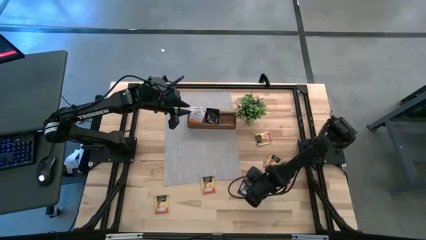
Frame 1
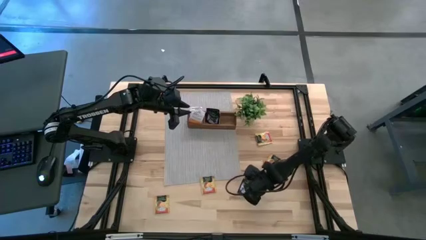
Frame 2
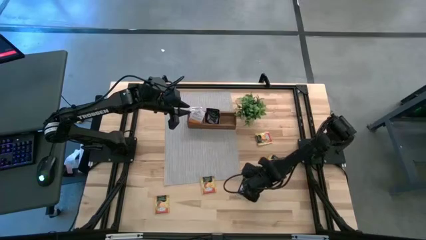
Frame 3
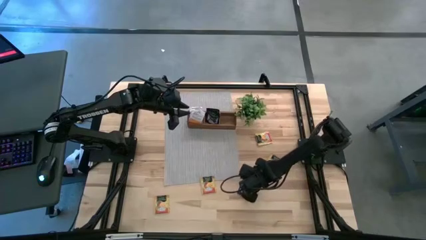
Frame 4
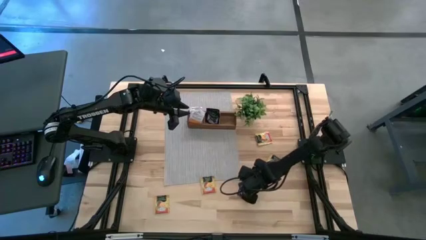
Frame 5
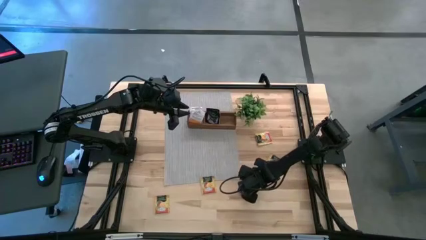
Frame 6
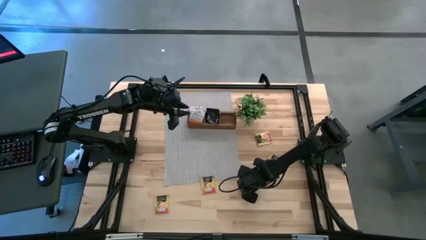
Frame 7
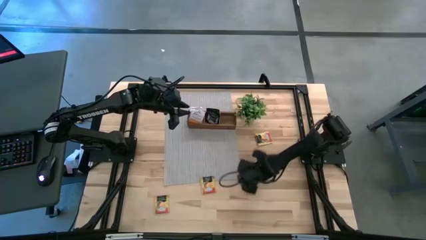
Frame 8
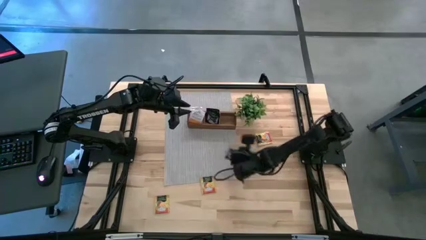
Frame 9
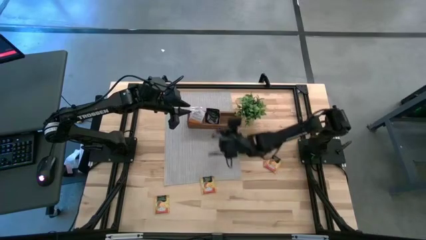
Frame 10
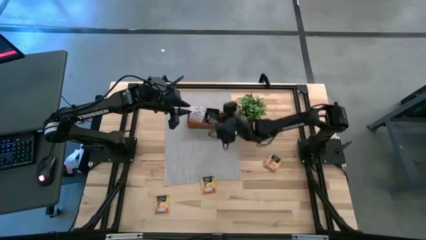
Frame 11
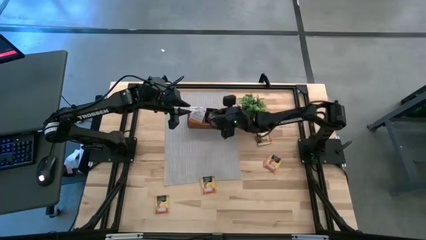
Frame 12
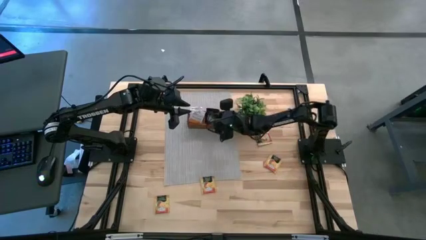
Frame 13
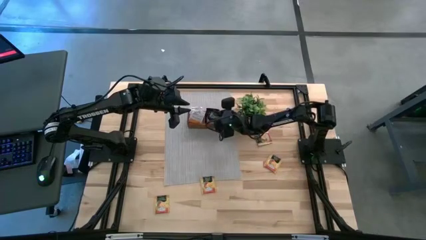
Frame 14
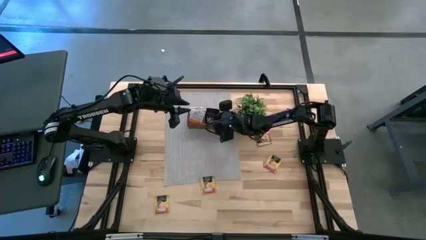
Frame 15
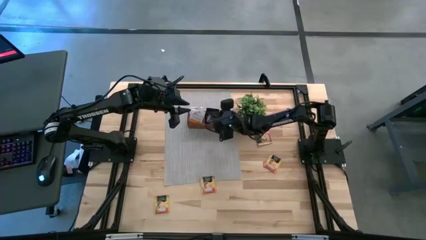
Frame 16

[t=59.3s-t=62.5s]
Task: Pick & Place Tea
Put the black tea bag in the middle section of the brown wooden organizer

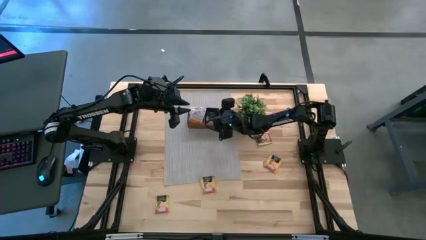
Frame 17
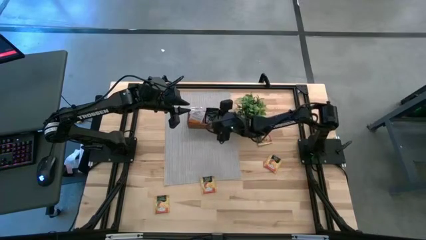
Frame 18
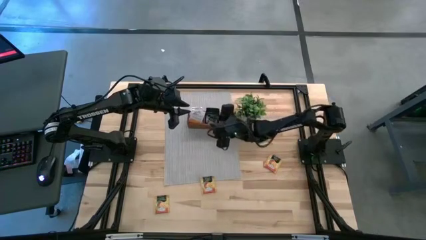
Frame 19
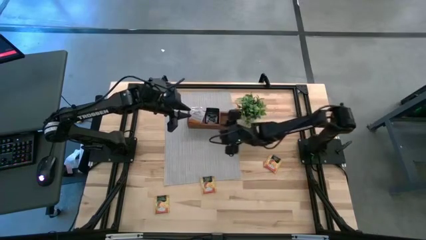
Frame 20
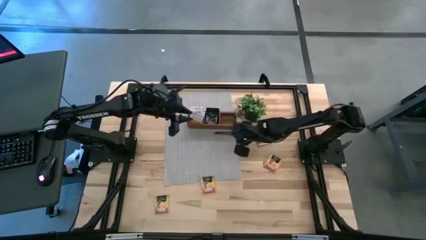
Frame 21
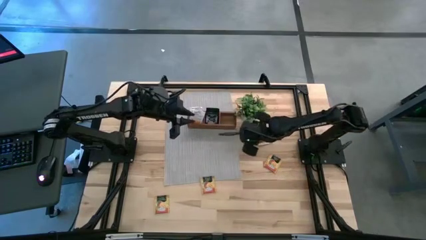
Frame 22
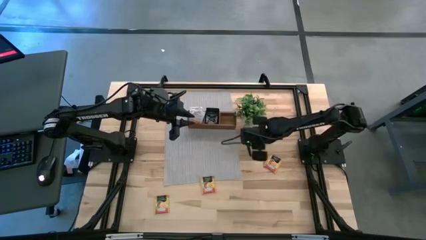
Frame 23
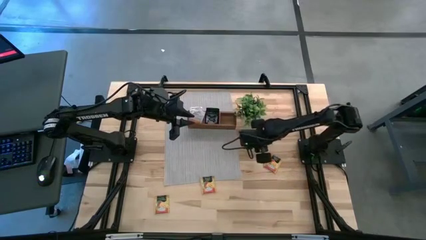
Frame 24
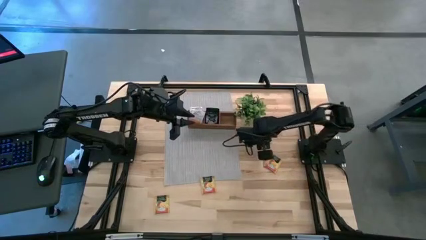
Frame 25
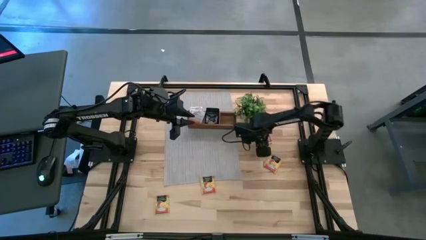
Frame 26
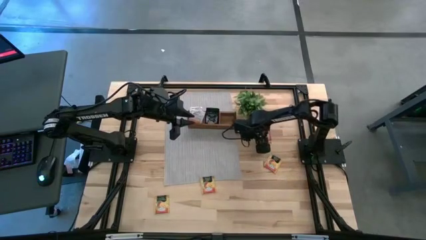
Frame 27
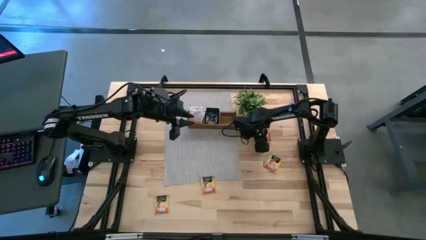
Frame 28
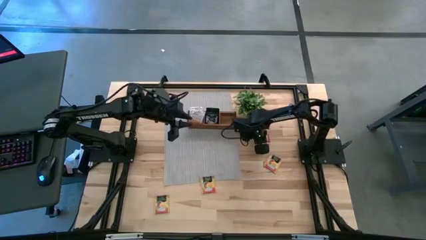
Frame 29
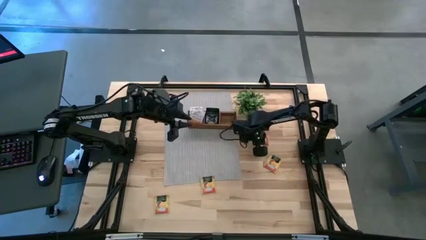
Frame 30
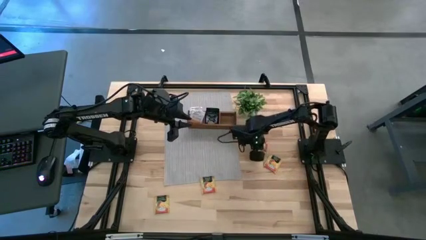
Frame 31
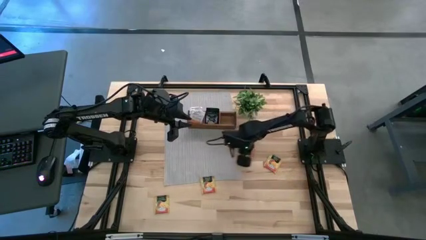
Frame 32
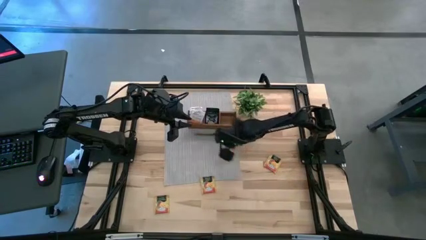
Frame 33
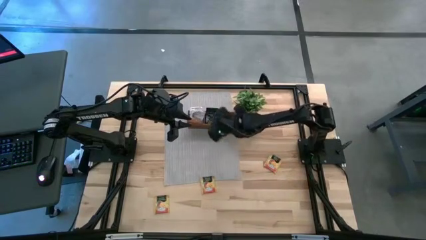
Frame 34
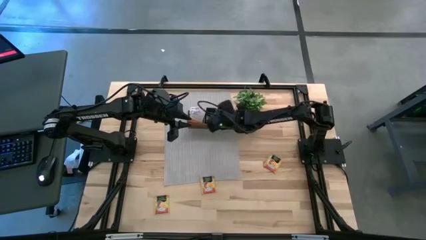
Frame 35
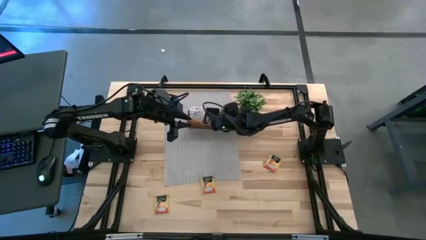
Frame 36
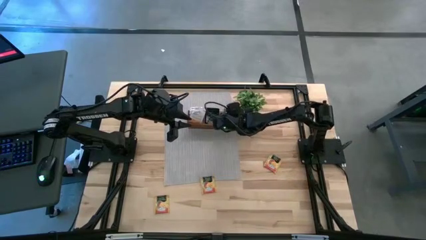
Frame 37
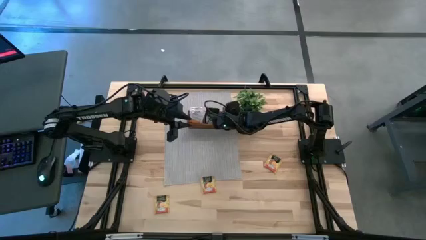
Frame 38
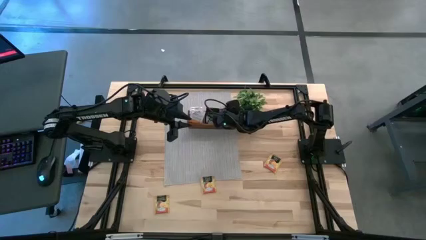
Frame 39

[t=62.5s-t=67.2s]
Put the orange tea bag in the right section of the brown wooden organizer

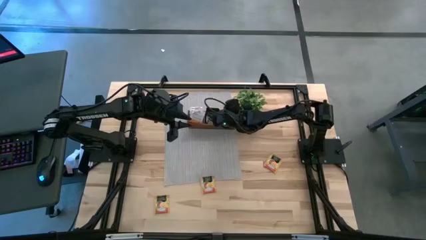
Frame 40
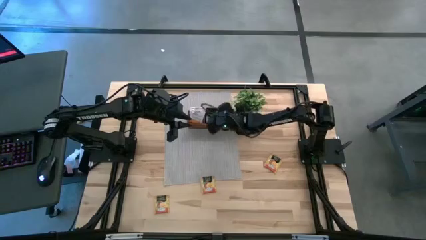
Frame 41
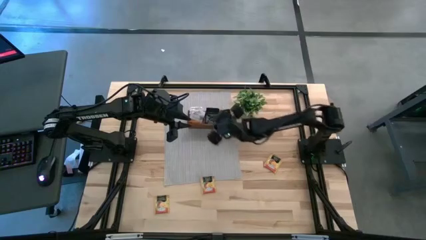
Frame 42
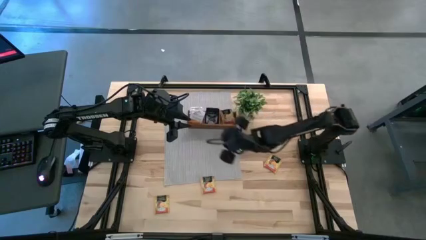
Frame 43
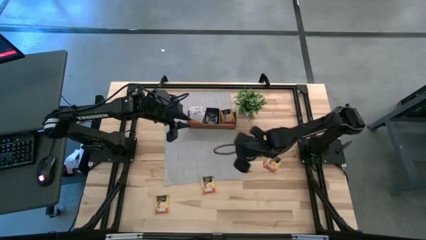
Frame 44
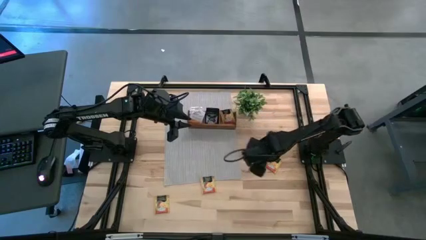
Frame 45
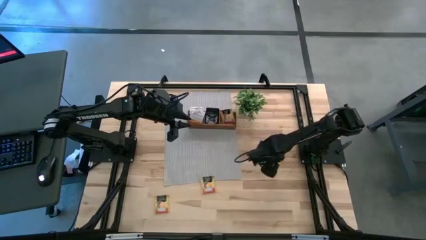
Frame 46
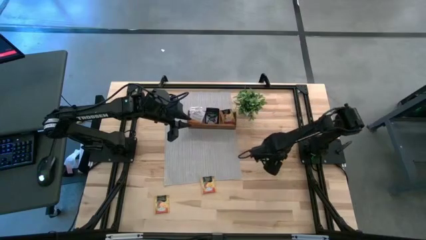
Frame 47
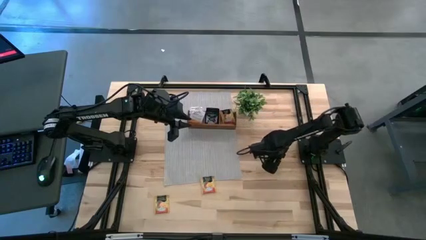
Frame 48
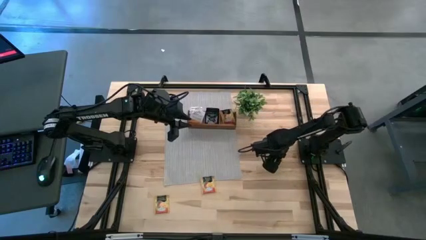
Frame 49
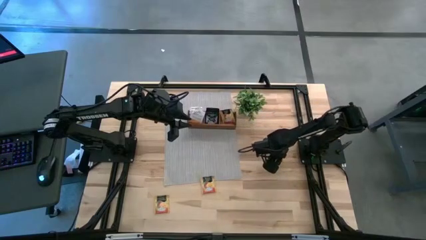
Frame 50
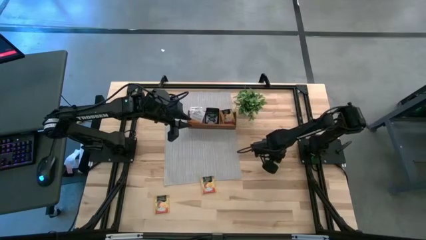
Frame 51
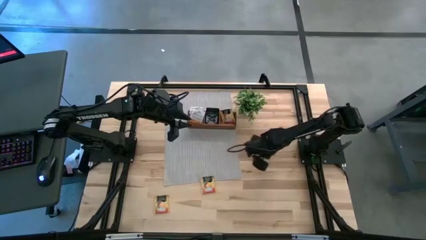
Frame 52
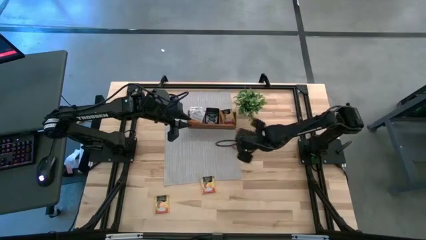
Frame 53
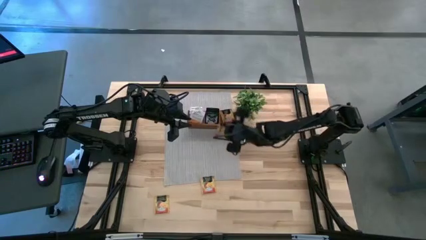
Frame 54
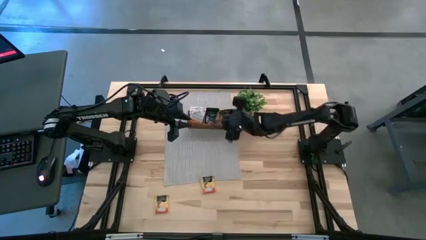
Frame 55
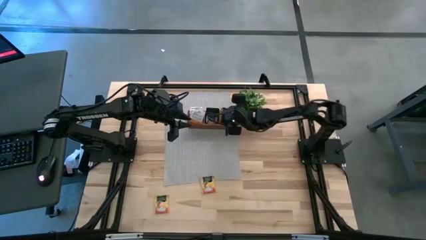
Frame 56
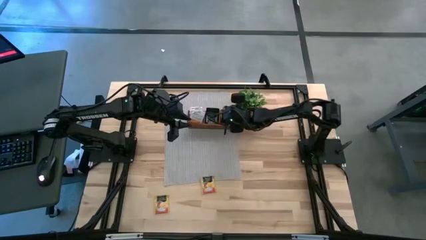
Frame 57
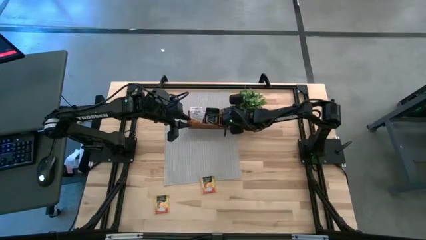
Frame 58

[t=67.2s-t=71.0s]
Put the orange tea bag in the right section of the brown wooden organizer

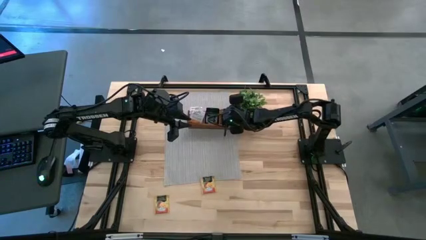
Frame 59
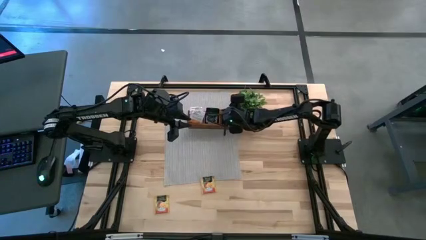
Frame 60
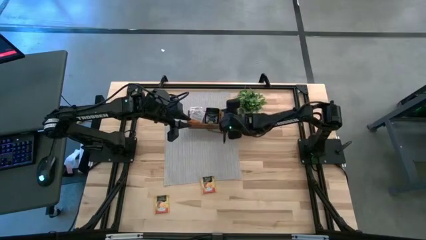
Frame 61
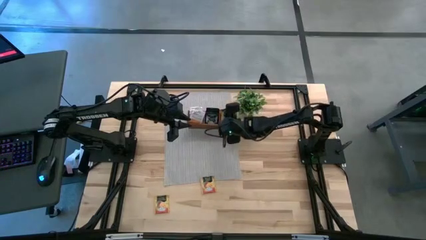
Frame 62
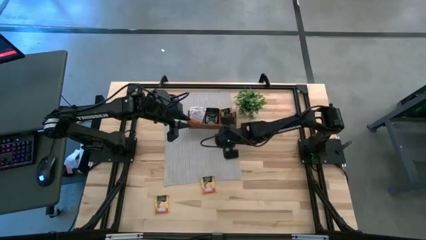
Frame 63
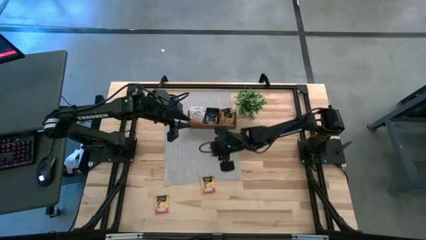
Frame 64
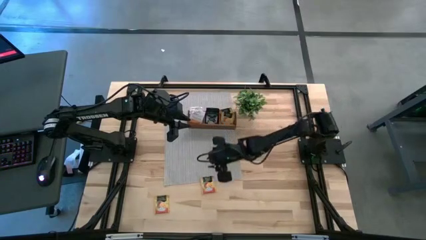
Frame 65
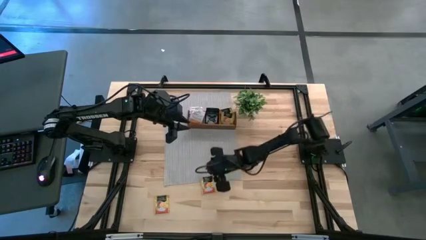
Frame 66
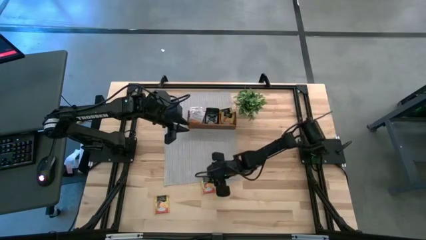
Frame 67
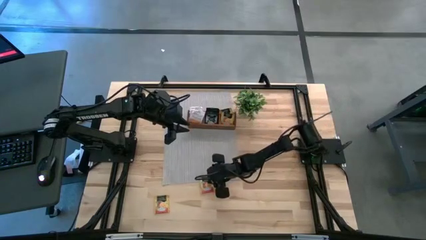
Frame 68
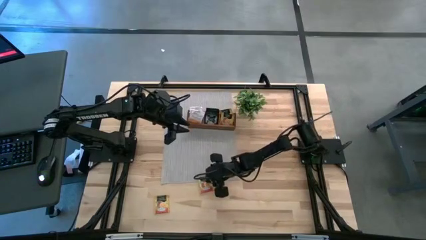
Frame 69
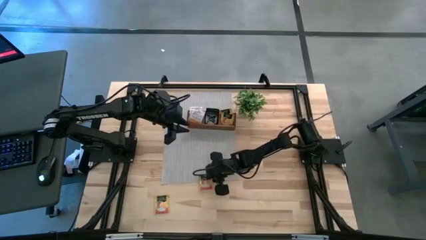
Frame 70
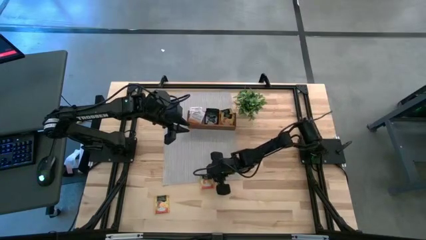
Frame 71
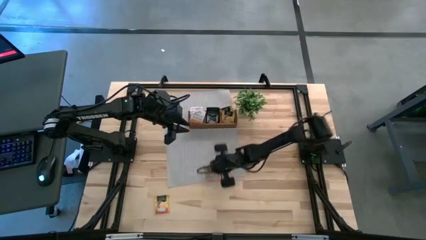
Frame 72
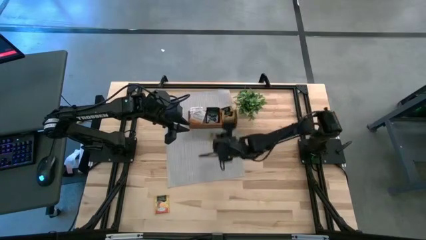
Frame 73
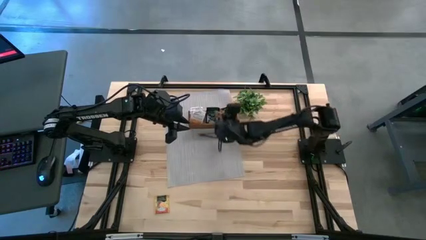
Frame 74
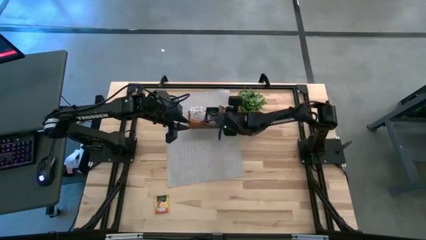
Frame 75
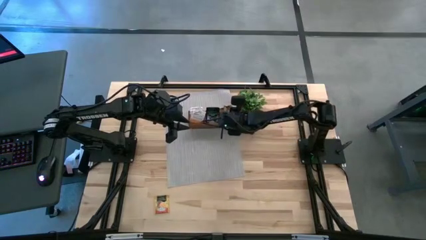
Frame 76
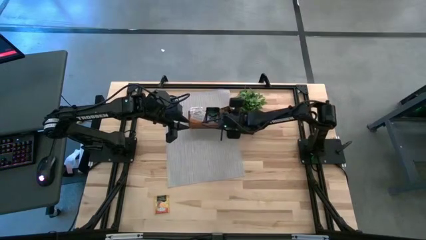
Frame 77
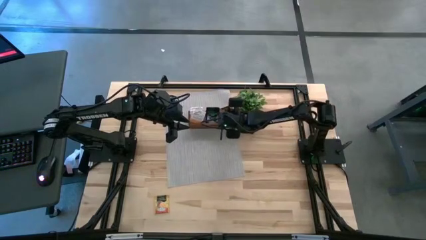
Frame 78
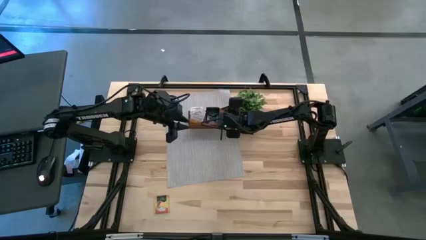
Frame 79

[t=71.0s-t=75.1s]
Put the orange tea bag in the right section of the brown wooden organizer

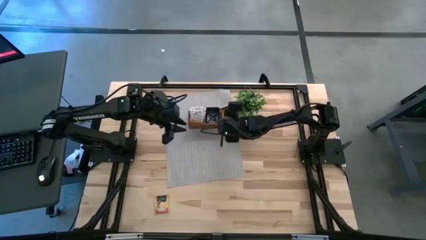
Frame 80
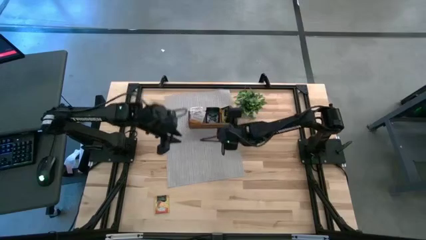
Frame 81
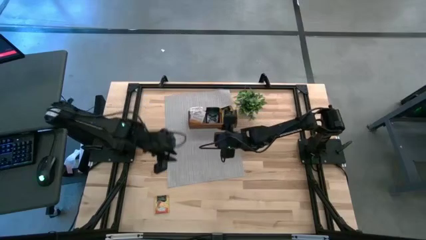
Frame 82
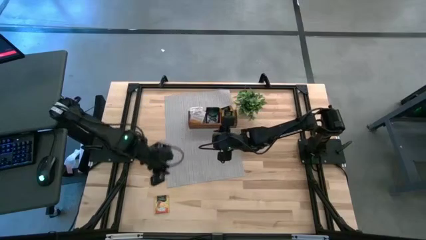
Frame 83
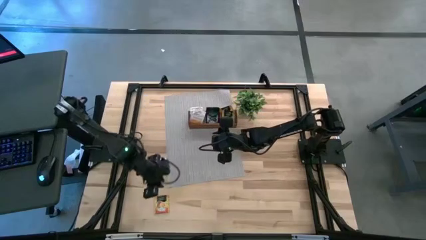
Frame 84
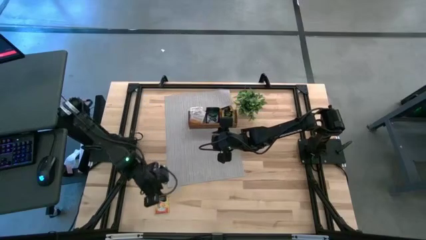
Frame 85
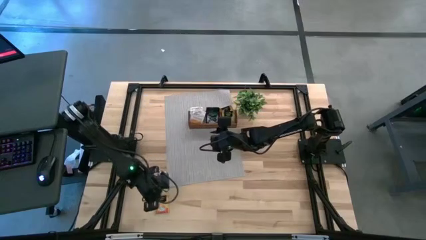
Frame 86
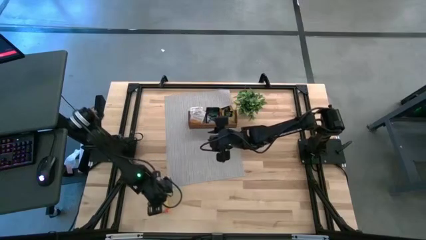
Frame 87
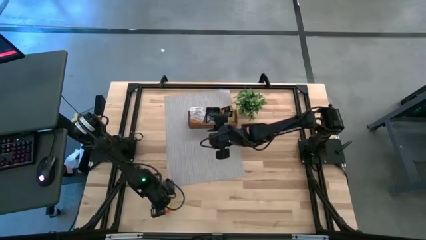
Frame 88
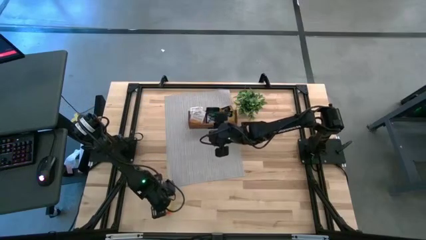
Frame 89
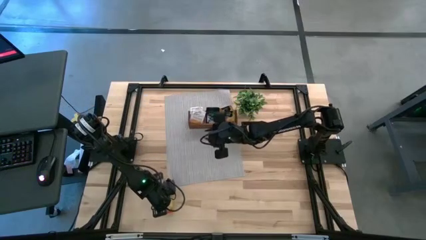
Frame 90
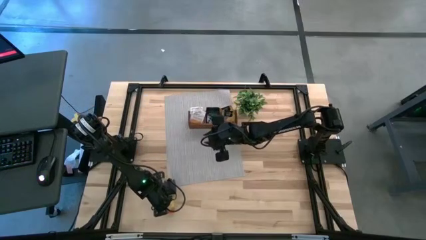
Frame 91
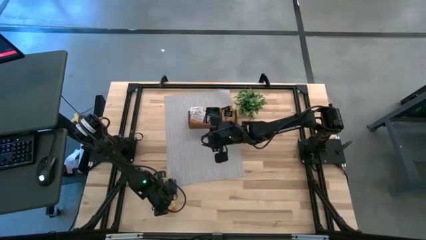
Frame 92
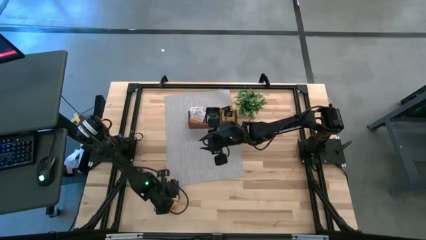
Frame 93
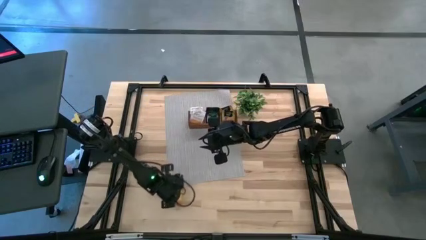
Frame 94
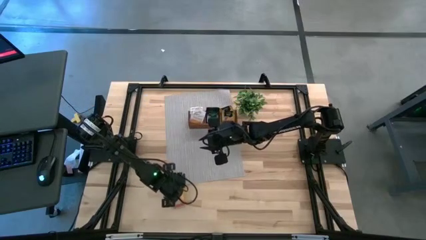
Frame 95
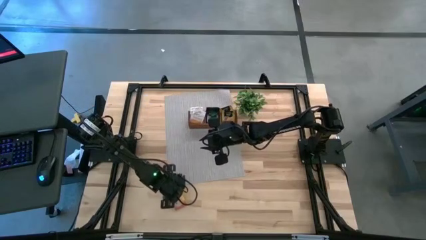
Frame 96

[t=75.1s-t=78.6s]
Put the orange tea bag in the right section of the brown wooden organizer
